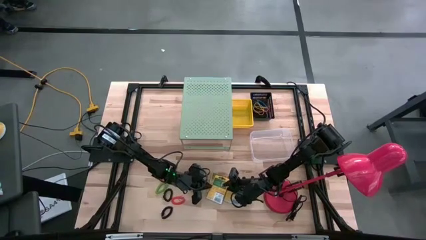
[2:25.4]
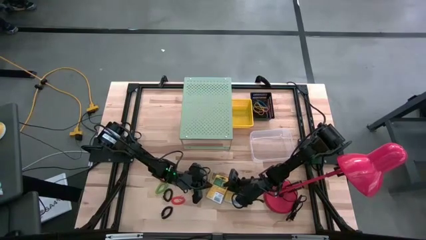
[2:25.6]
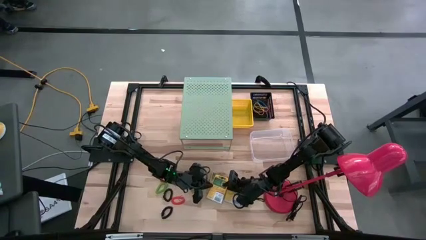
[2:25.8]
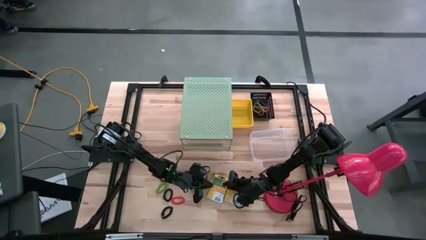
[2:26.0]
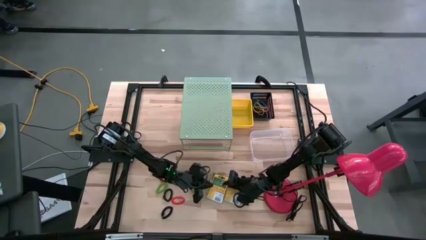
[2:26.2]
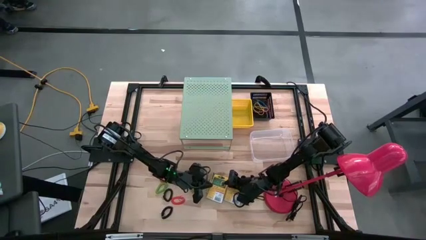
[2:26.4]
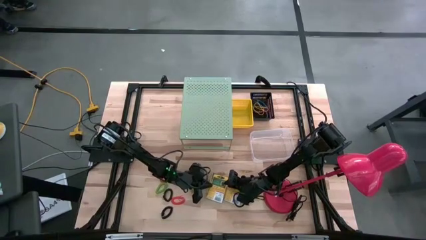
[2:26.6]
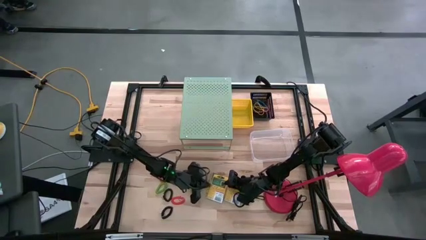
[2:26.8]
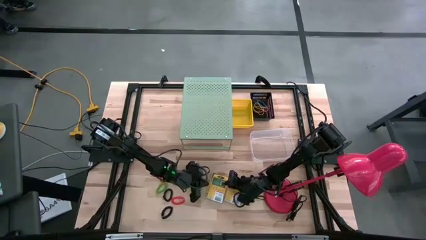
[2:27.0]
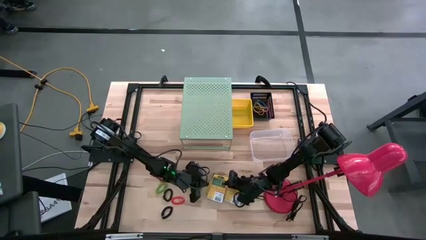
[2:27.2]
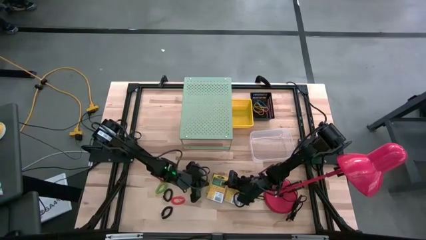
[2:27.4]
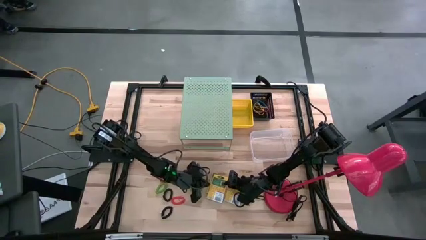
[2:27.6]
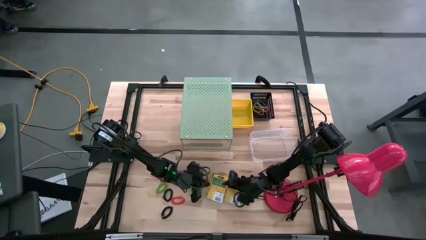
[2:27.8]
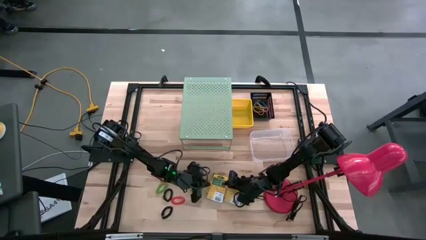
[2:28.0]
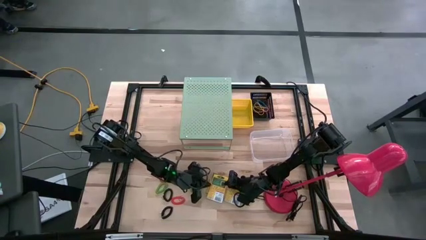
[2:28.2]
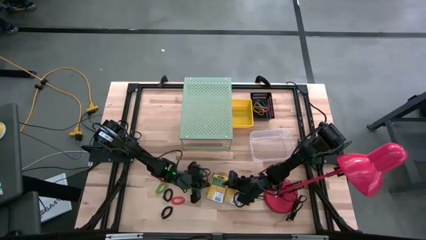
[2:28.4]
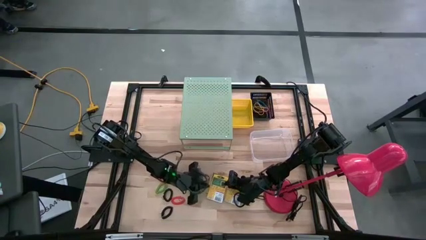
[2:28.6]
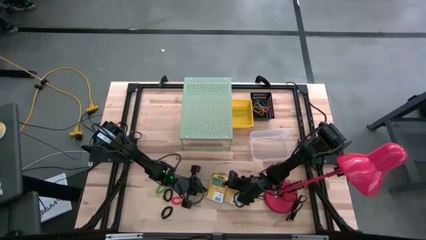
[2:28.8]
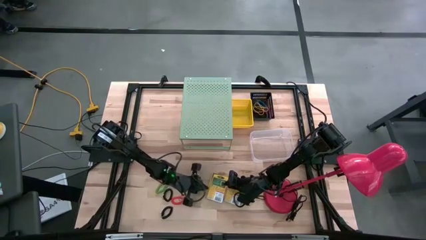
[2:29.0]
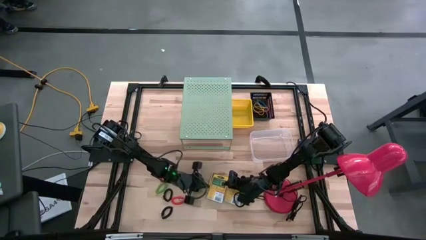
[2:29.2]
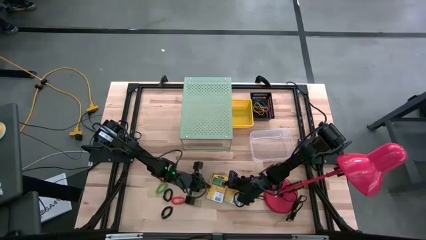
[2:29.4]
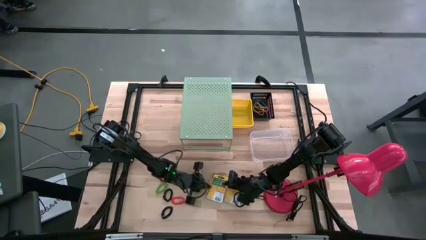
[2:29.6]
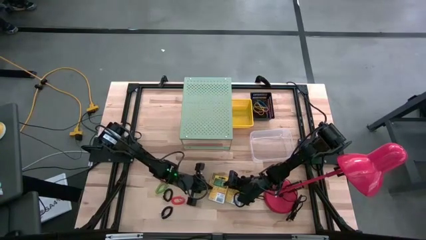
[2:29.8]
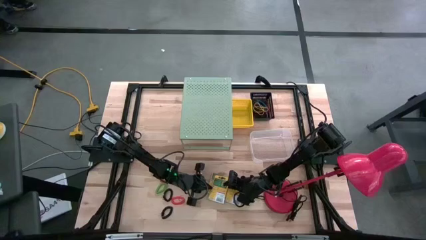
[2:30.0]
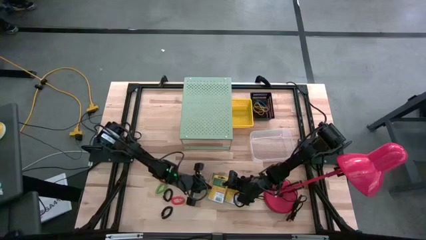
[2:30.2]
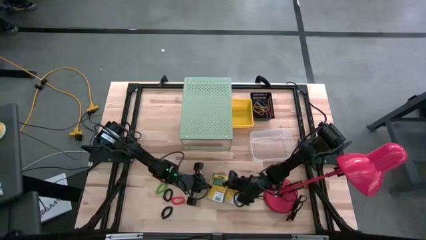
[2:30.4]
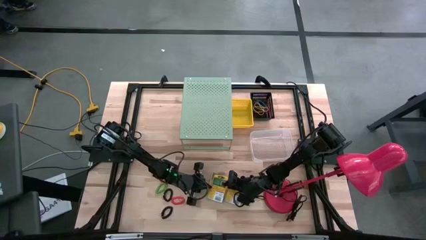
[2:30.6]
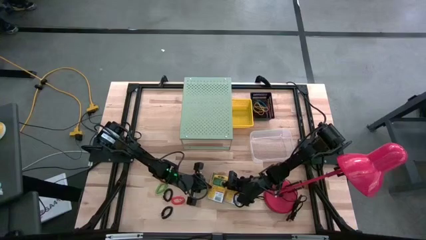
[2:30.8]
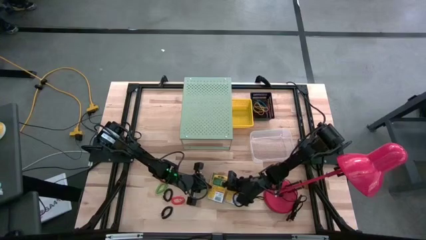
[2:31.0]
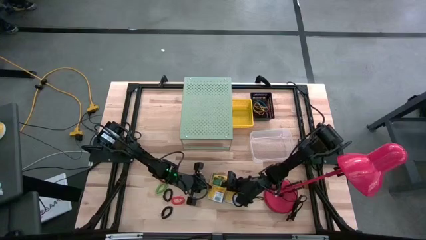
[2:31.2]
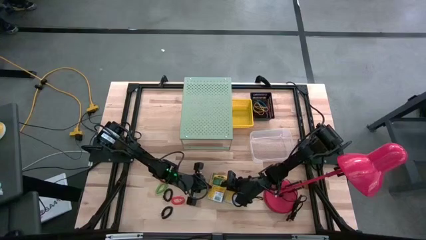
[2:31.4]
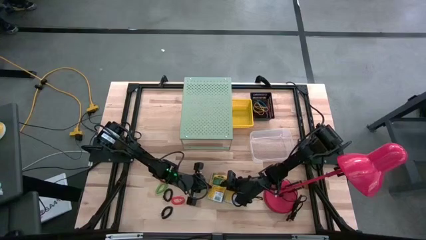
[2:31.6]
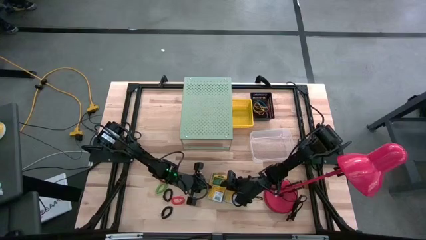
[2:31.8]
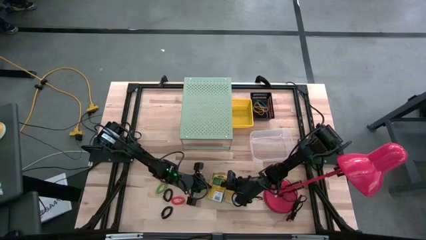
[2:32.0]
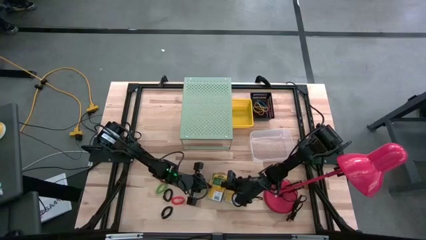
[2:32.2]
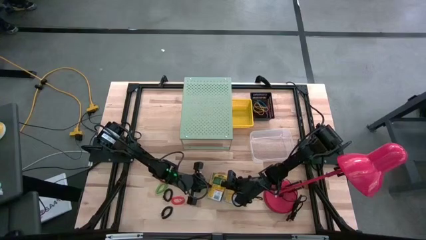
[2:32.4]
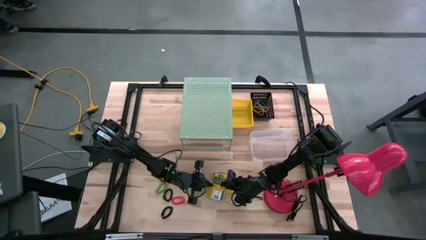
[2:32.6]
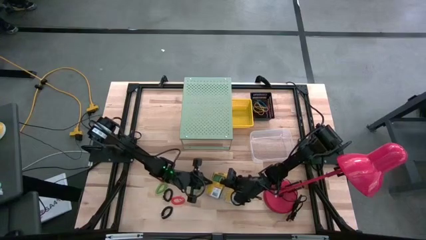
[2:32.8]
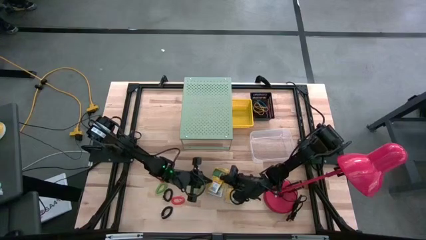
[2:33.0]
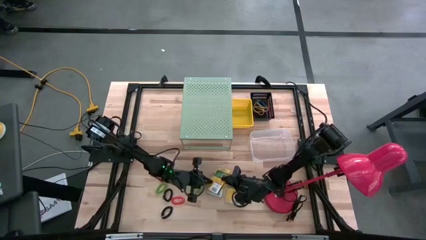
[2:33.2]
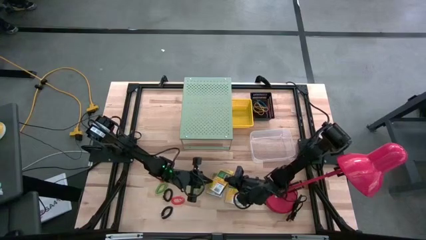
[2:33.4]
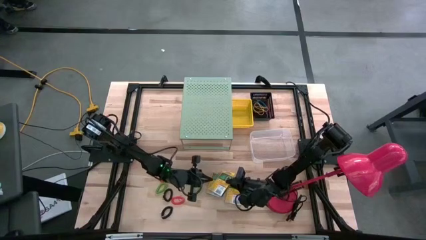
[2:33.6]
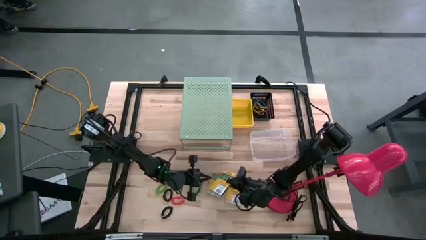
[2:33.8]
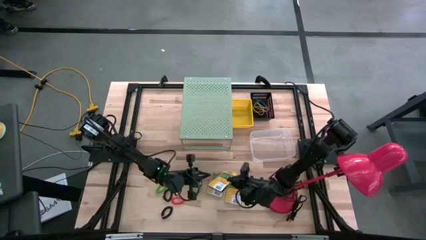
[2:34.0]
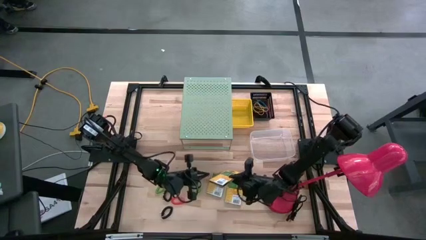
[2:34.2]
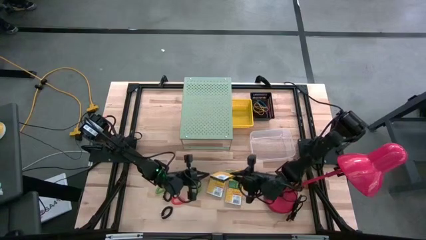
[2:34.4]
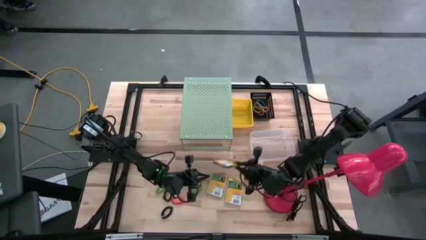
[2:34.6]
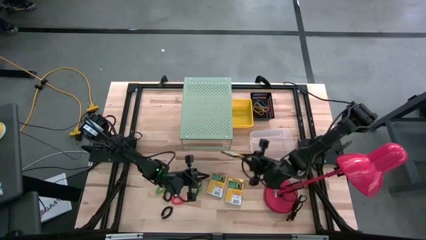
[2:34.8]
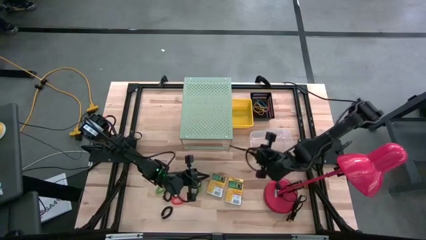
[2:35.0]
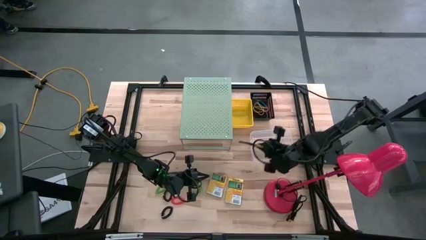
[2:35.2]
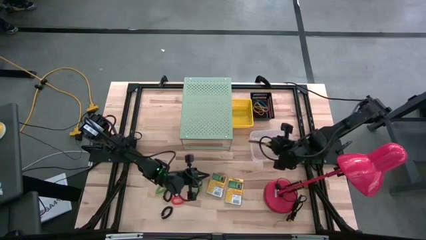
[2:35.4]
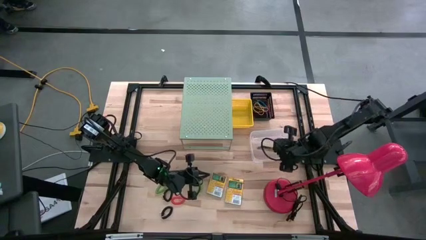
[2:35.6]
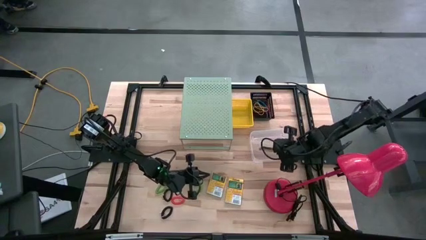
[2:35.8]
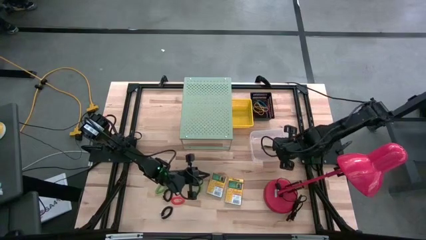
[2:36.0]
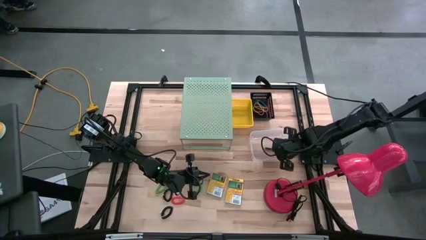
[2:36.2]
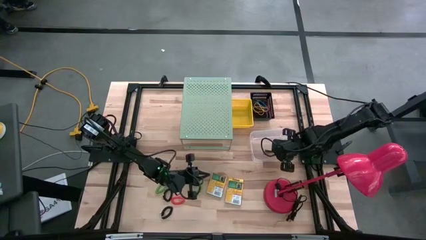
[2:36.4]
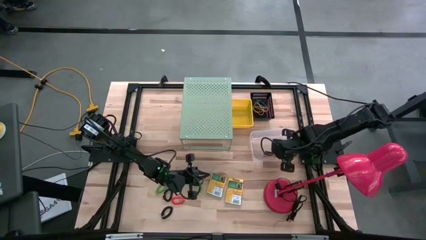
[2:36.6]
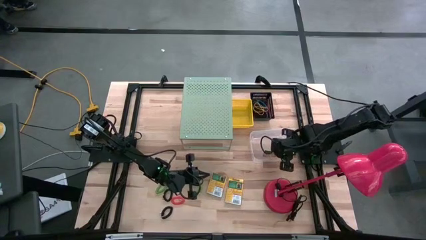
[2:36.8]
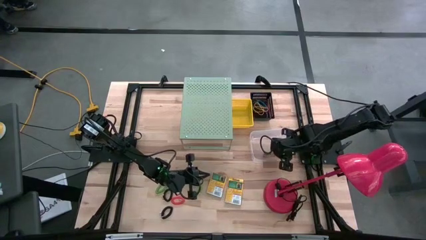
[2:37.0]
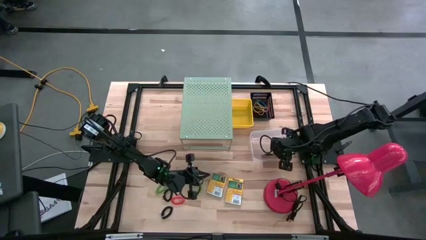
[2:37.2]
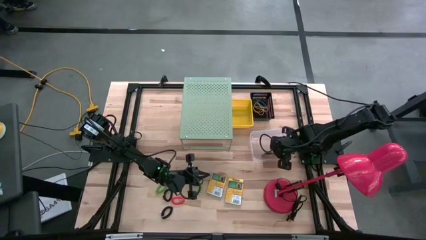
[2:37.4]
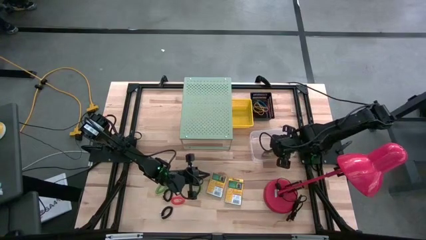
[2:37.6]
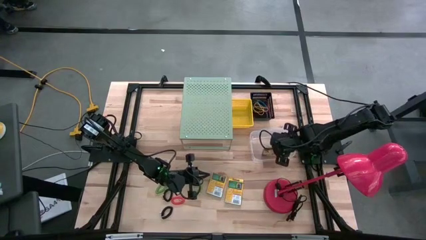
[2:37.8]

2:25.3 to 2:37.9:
Task: Pick & Place Office Desk Supplies
Put the crayon box into the transparent bin
